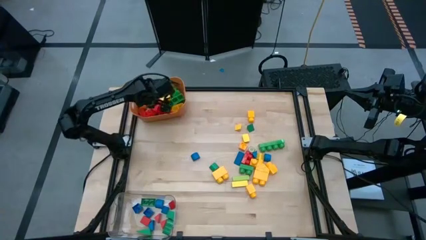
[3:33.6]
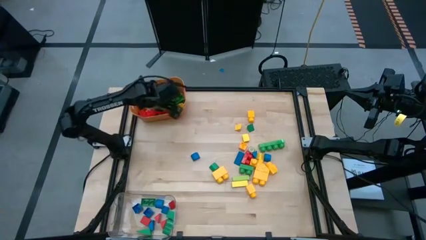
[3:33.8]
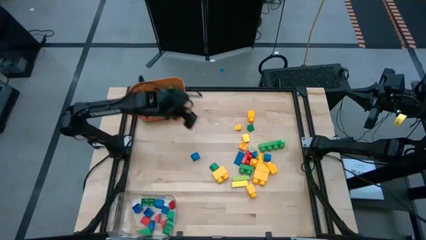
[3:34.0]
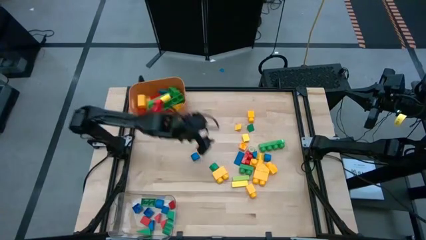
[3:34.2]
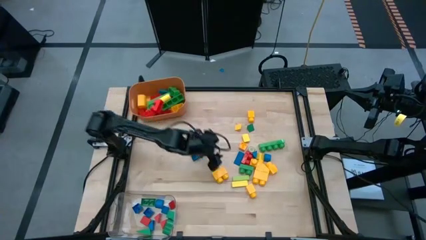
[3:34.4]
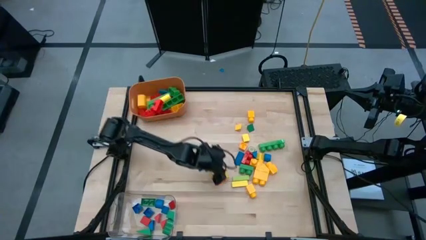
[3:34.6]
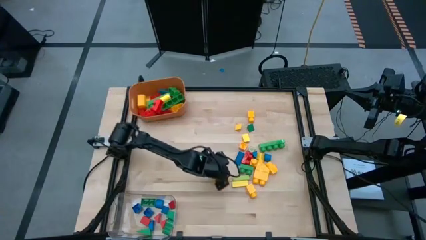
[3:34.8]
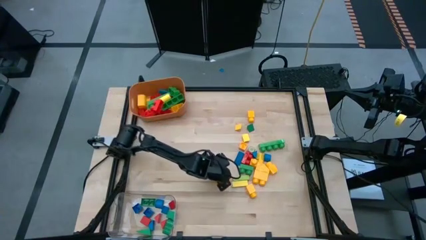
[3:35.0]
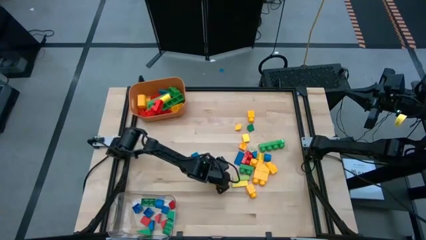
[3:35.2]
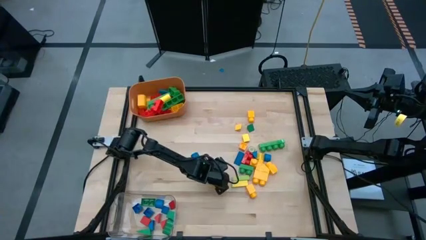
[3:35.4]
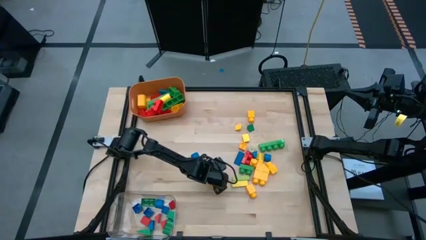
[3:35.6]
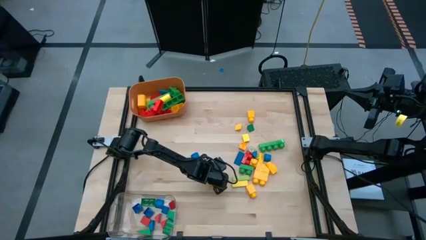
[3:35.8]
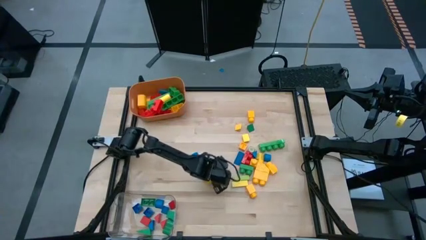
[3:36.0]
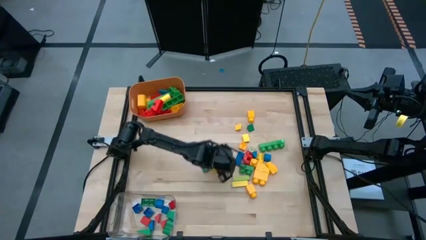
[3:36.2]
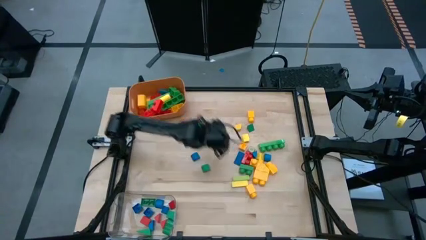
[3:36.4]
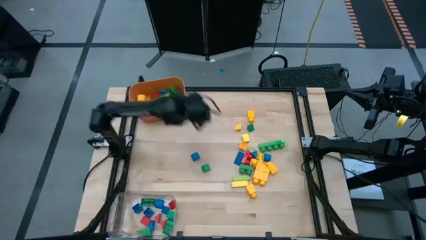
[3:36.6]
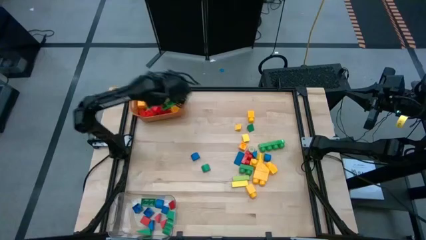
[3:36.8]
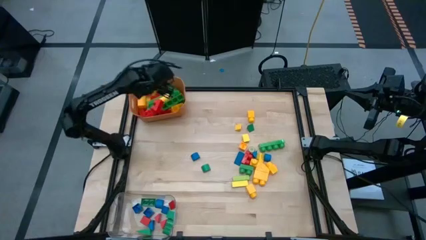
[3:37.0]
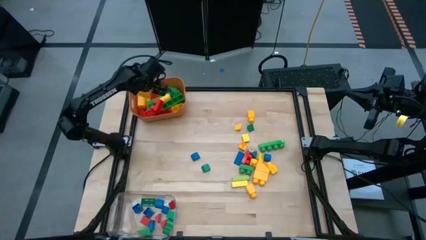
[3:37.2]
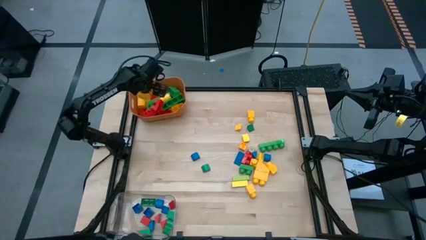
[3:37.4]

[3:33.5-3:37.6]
Task: Sort blocks by size
Put the big yellow game piece into the orange bin

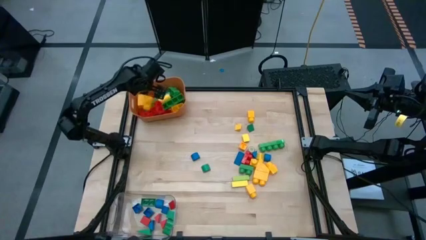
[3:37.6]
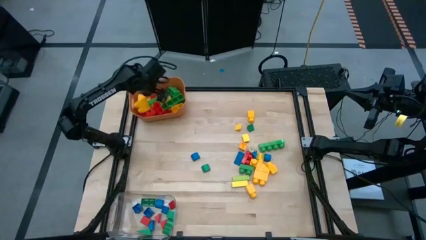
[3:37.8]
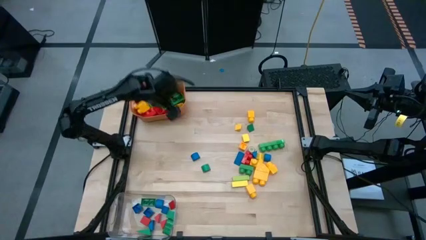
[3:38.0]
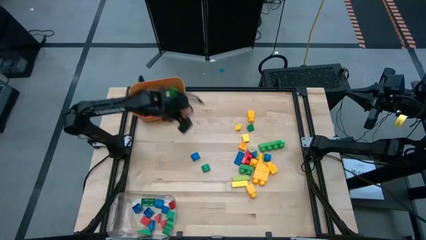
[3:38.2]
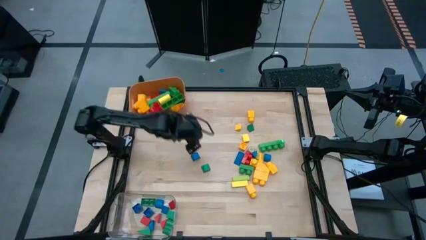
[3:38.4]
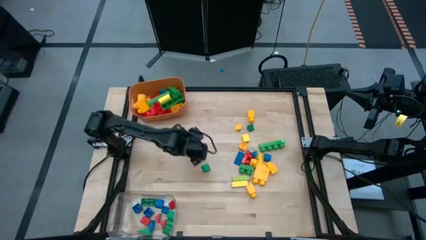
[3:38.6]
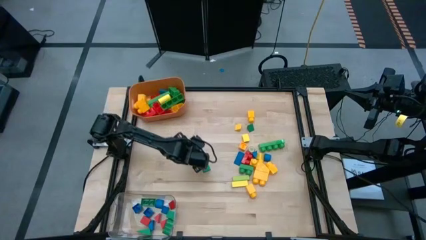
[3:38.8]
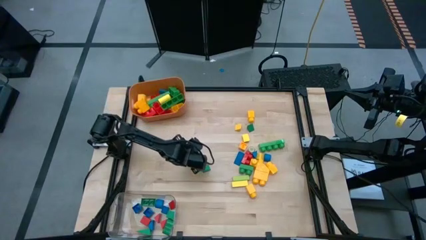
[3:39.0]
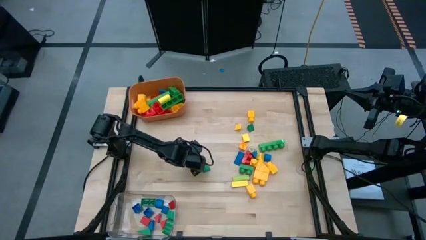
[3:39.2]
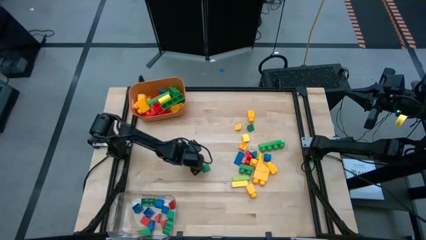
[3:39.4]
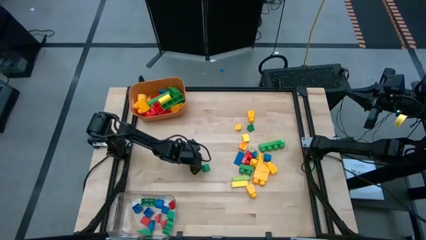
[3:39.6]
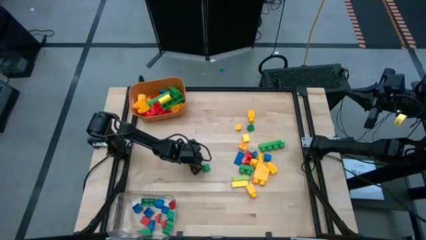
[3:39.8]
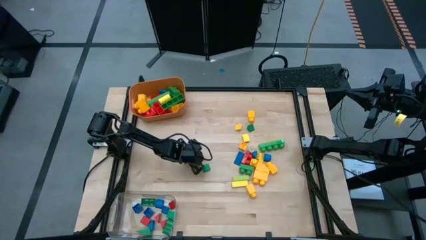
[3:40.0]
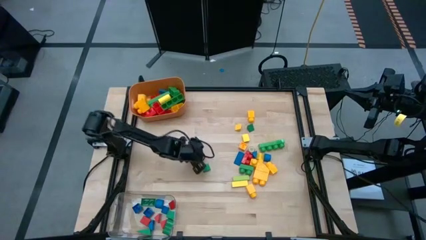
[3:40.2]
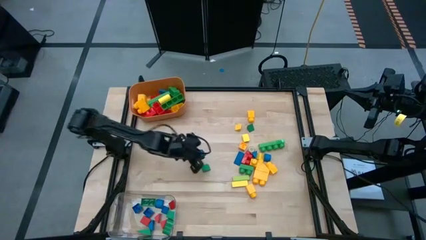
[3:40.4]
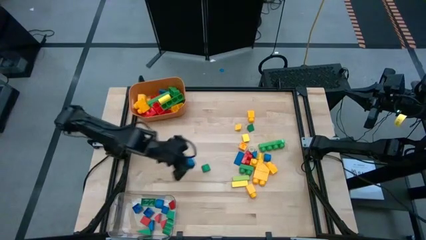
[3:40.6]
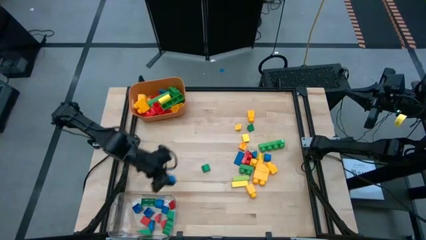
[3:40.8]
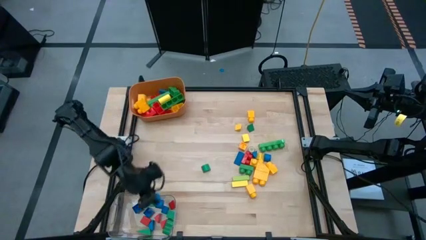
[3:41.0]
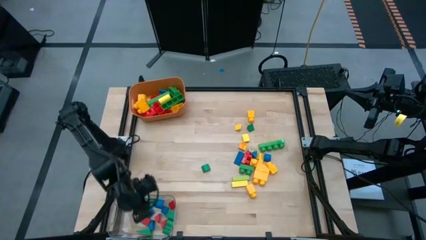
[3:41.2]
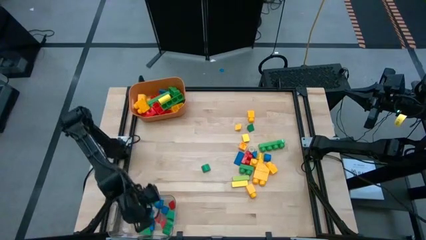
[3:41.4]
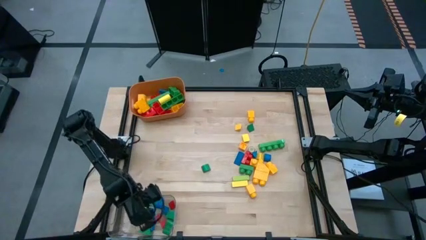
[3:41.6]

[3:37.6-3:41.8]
Put the small blue block into the transparent bin

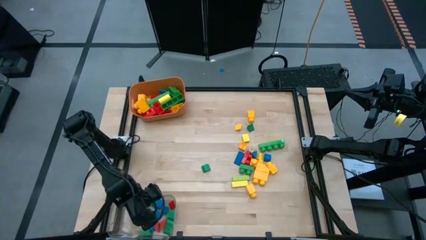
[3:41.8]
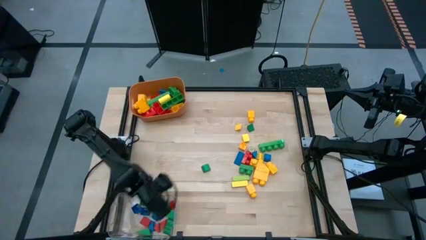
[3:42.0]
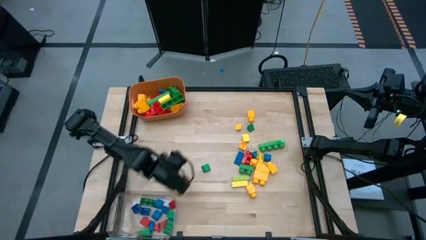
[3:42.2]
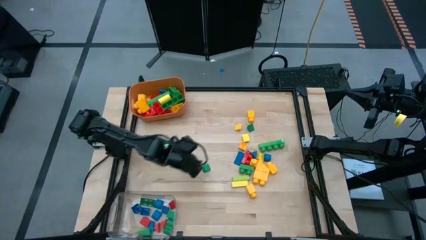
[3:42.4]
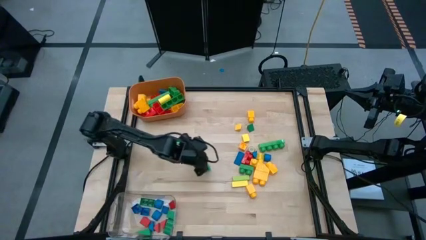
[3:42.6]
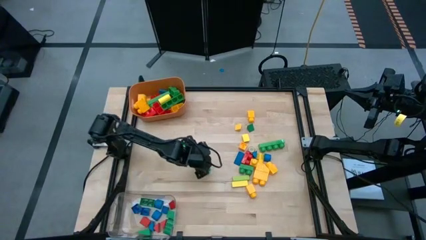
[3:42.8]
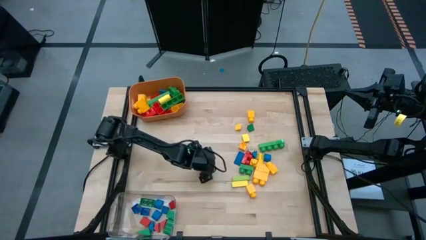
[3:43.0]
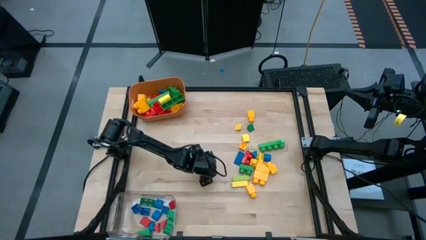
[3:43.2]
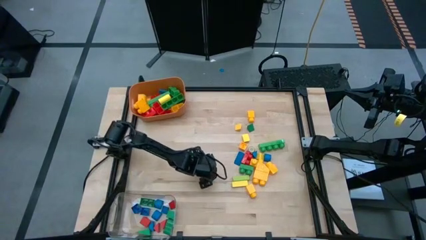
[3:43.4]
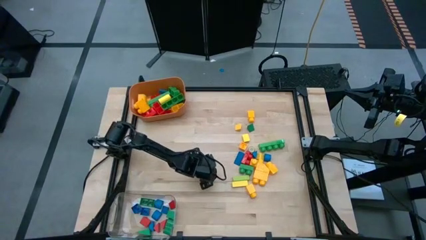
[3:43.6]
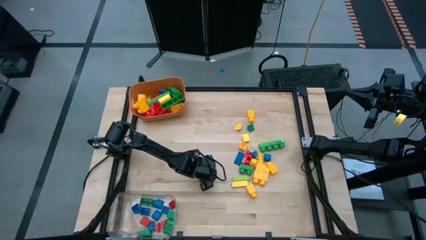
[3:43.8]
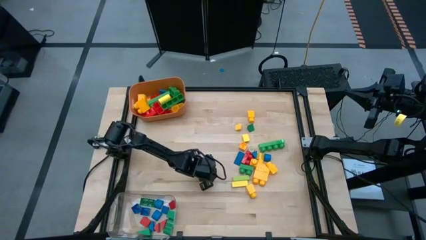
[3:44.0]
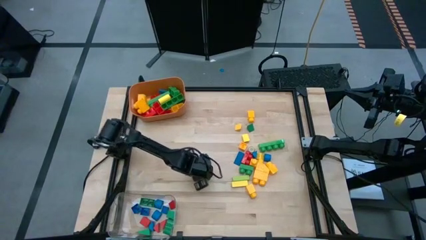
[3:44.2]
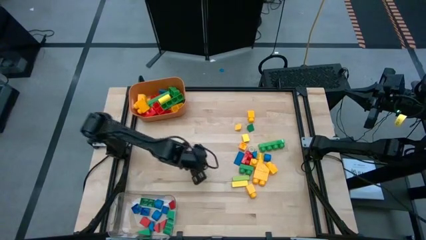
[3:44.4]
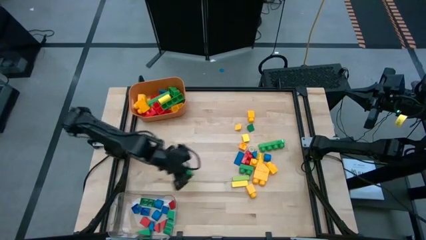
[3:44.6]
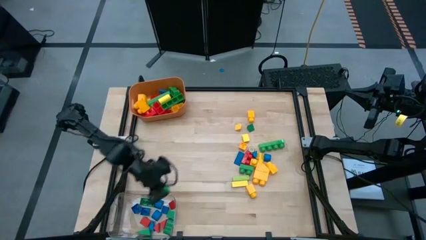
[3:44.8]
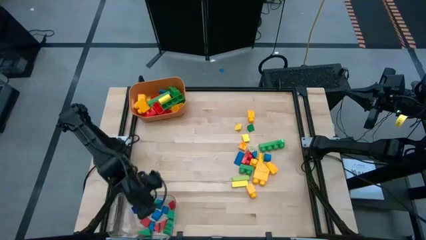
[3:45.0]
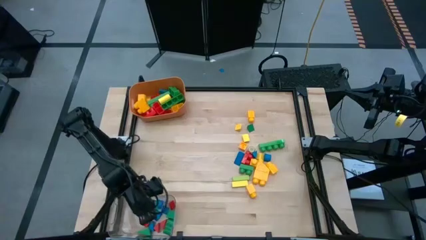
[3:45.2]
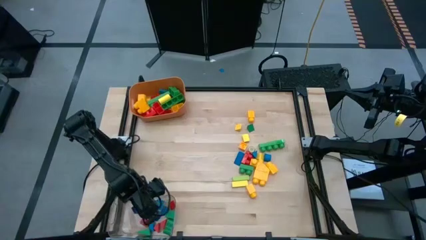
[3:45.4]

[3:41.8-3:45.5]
Put the small green block into the transparent bin

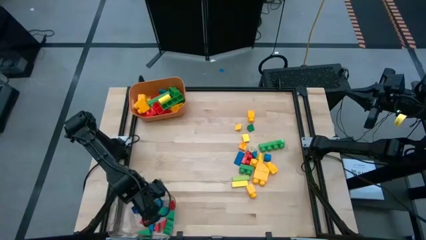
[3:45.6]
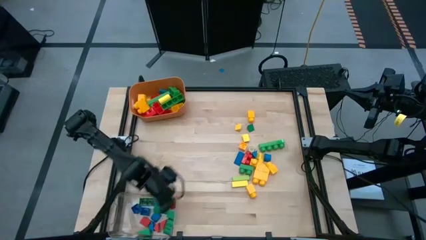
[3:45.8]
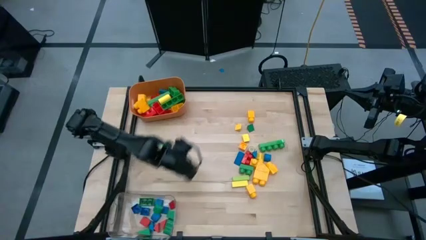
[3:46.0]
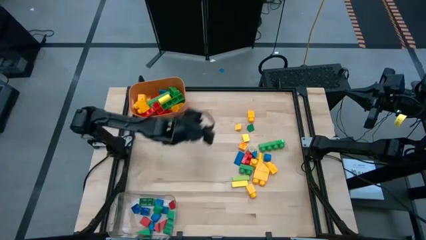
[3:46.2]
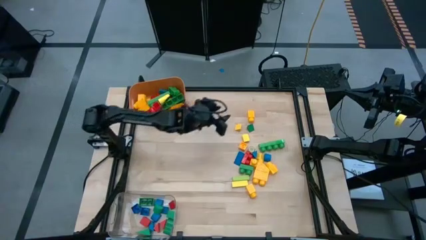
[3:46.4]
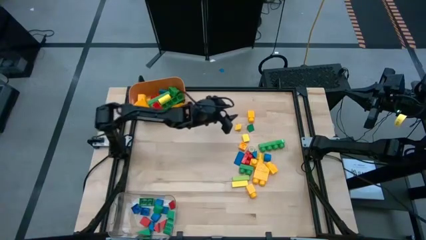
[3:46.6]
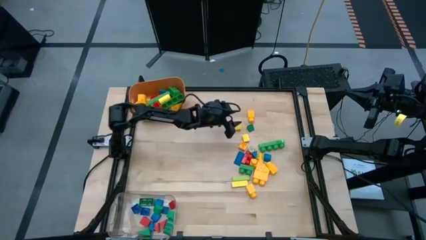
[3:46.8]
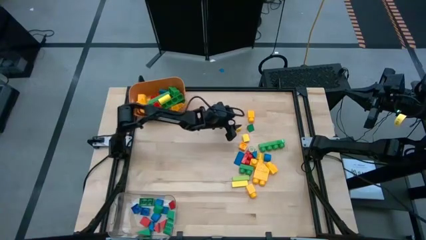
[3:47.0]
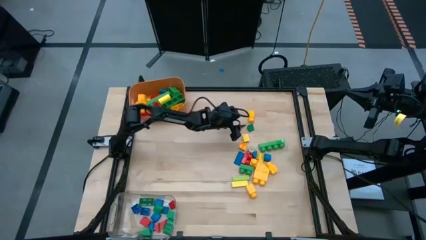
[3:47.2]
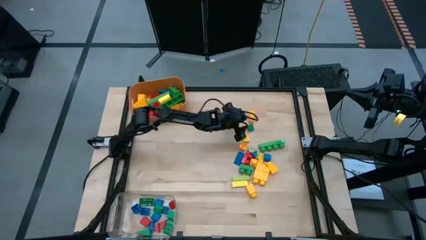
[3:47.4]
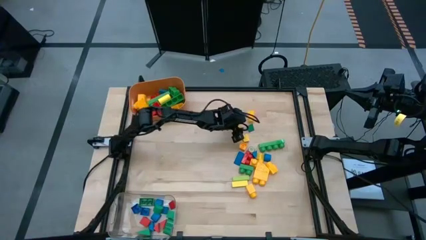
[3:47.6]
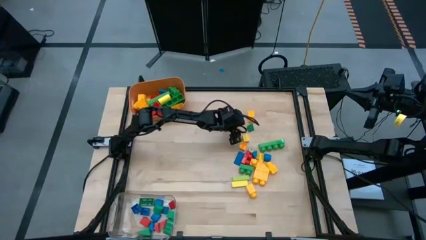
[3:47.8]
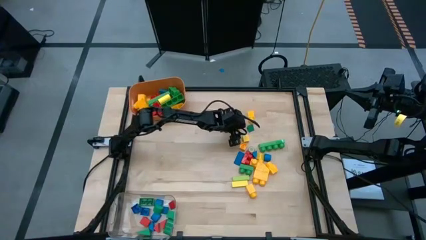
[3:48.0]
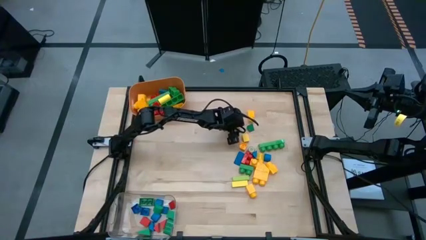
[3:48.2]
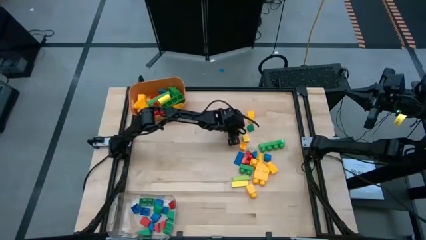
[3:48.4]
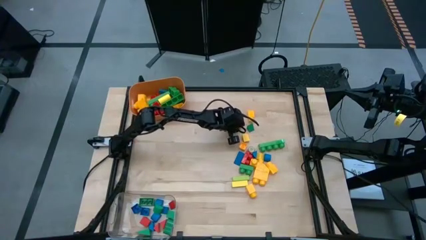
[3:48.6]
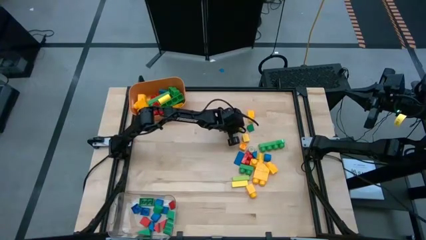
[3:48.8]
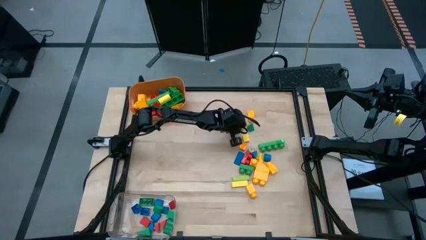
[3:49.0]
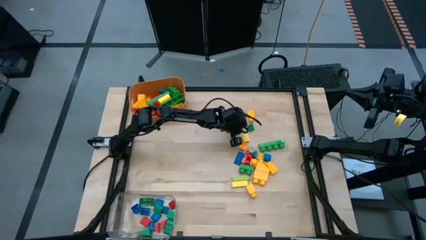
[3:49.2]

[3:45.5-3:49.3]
Put the small yellow block into the transparent bin
